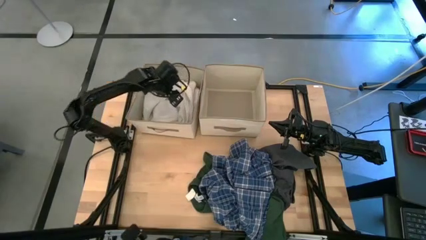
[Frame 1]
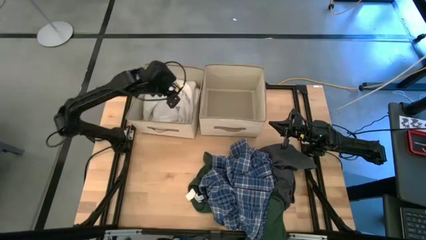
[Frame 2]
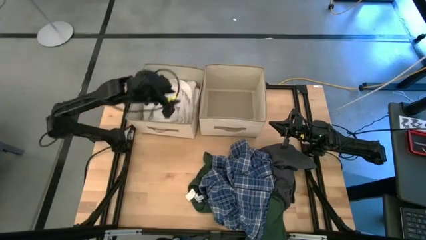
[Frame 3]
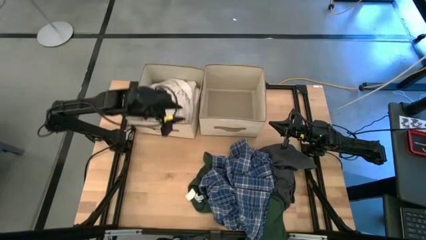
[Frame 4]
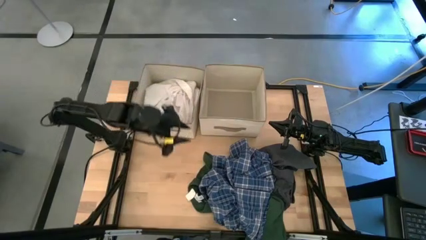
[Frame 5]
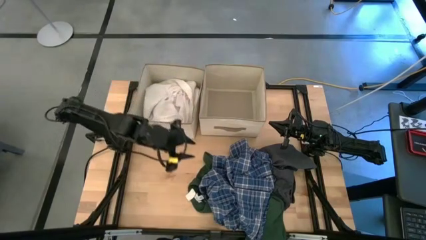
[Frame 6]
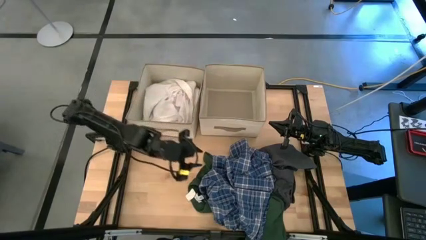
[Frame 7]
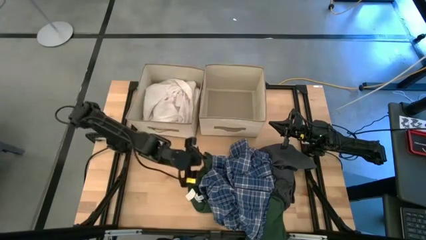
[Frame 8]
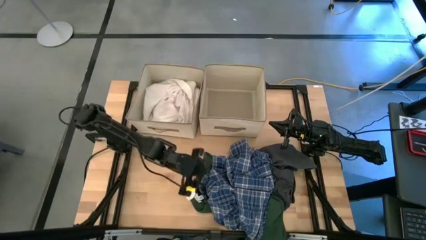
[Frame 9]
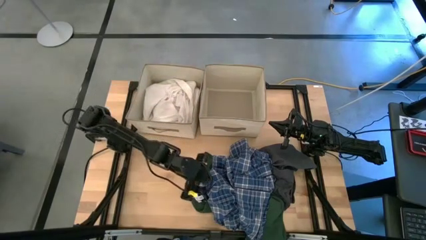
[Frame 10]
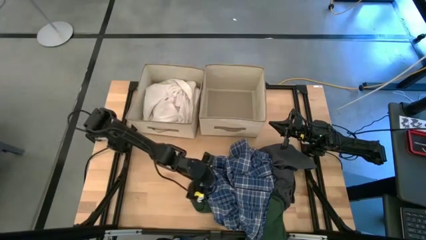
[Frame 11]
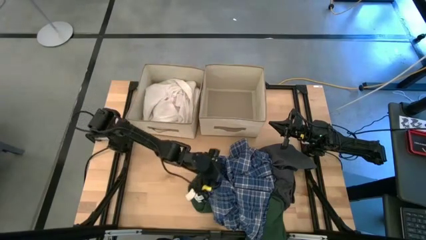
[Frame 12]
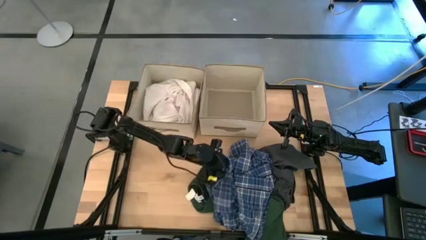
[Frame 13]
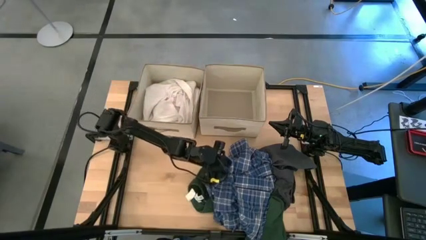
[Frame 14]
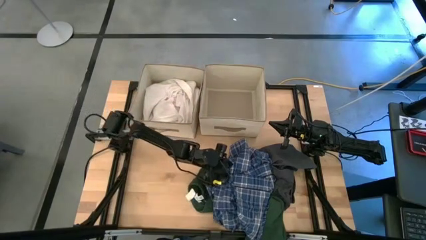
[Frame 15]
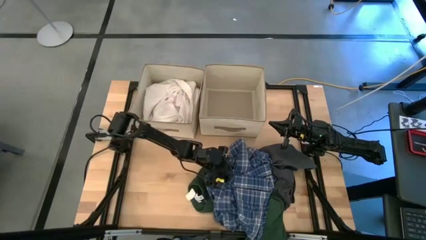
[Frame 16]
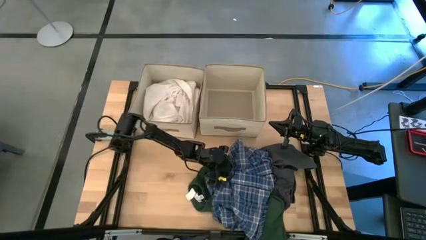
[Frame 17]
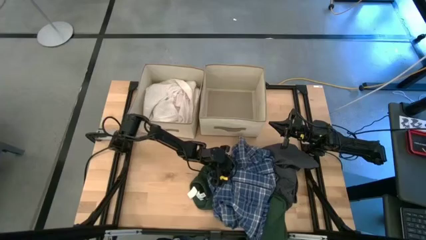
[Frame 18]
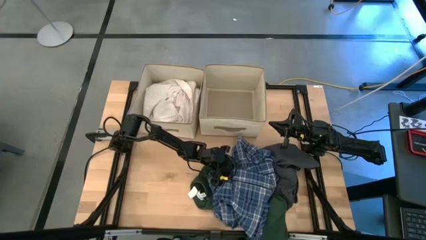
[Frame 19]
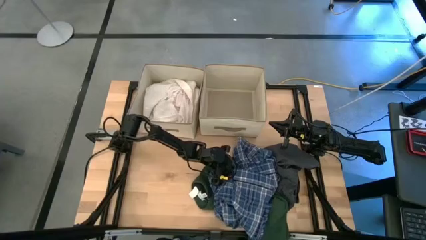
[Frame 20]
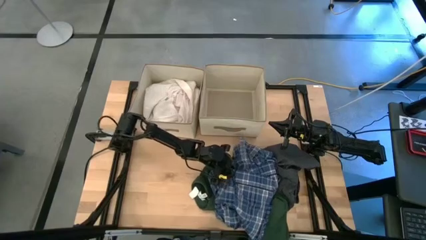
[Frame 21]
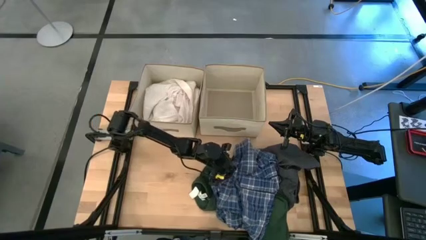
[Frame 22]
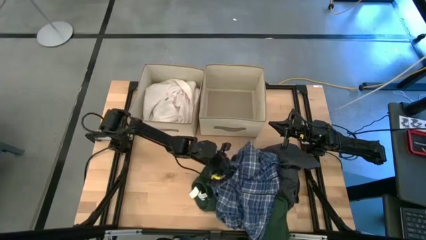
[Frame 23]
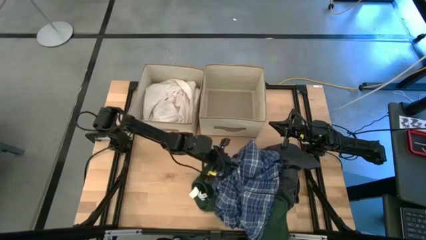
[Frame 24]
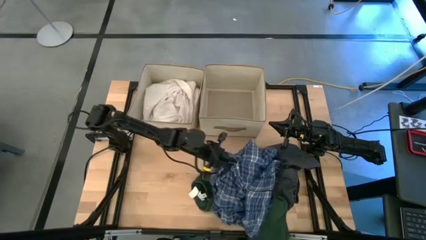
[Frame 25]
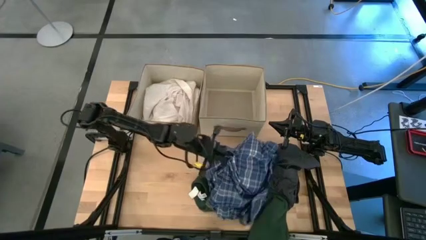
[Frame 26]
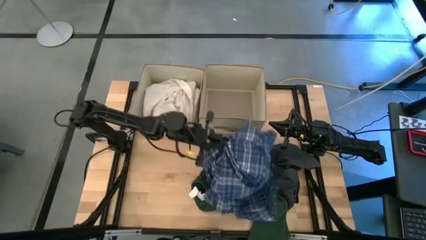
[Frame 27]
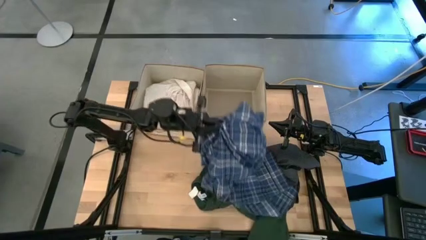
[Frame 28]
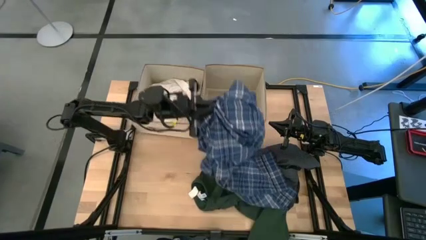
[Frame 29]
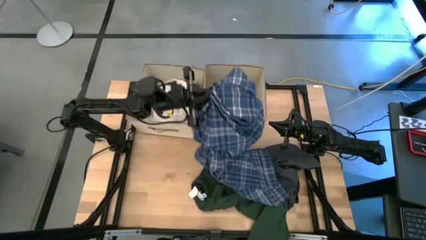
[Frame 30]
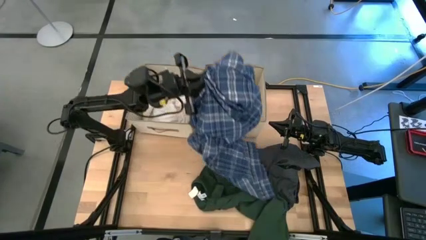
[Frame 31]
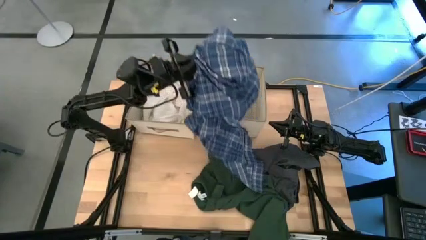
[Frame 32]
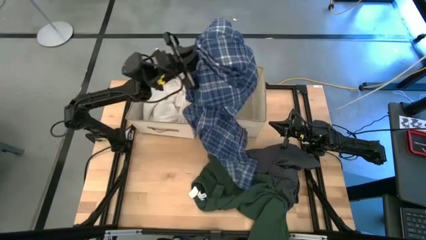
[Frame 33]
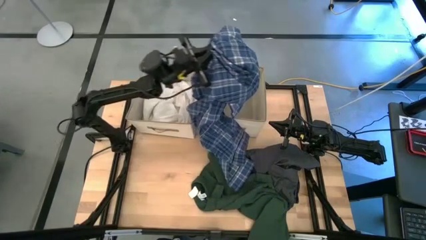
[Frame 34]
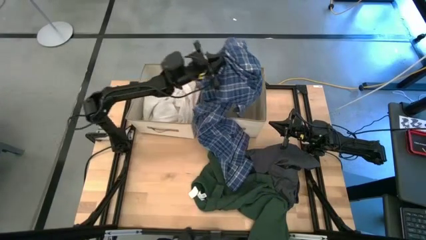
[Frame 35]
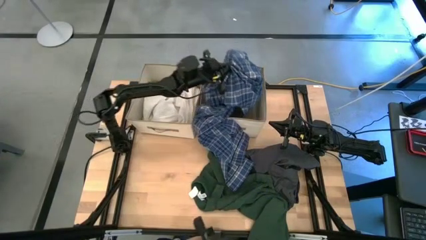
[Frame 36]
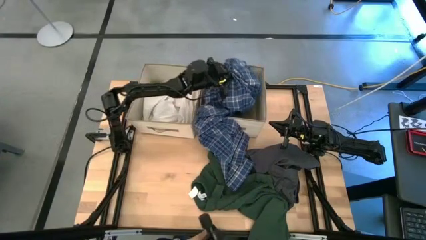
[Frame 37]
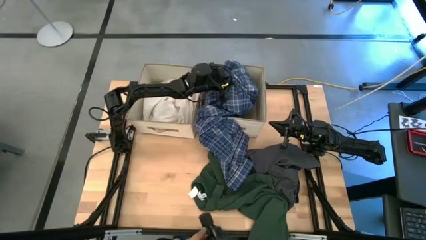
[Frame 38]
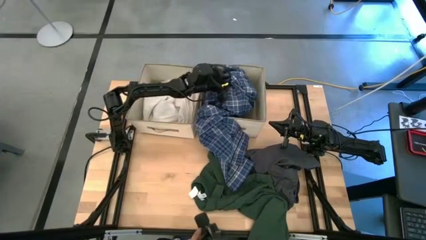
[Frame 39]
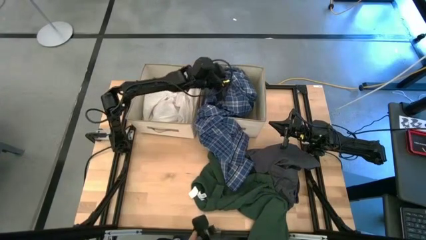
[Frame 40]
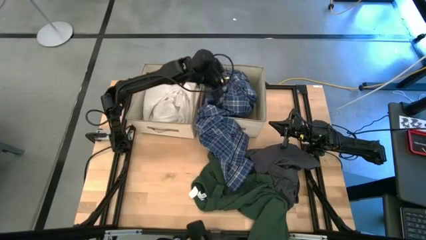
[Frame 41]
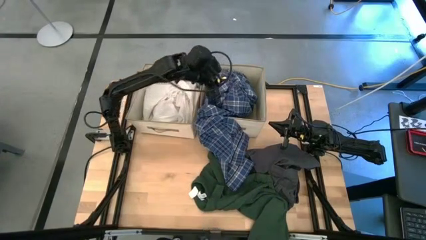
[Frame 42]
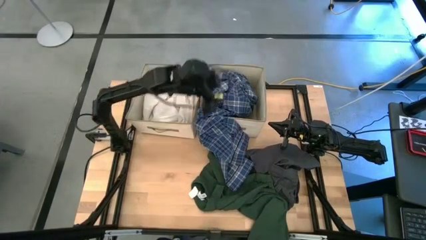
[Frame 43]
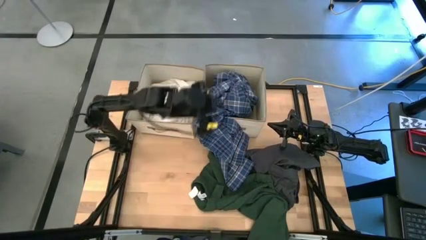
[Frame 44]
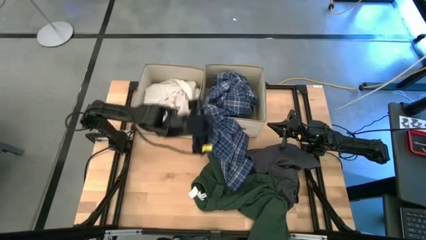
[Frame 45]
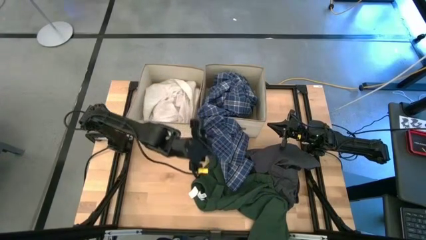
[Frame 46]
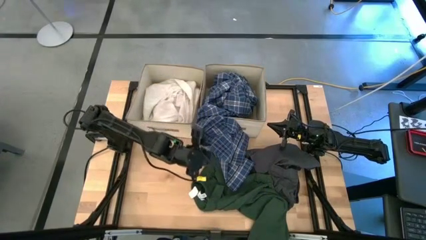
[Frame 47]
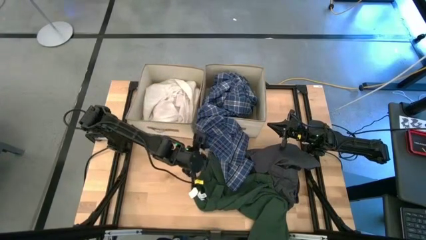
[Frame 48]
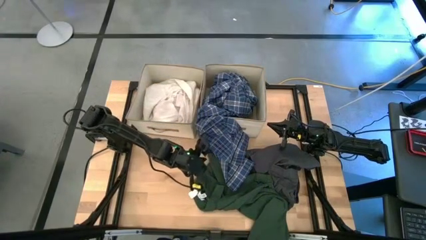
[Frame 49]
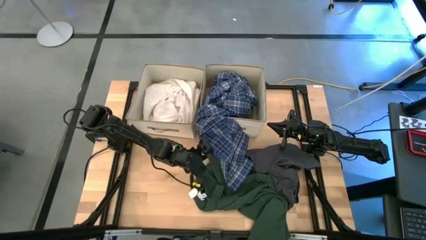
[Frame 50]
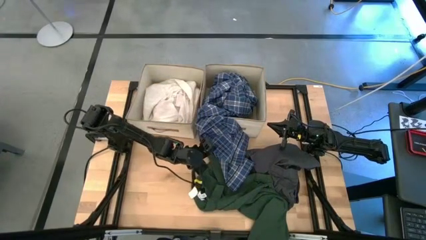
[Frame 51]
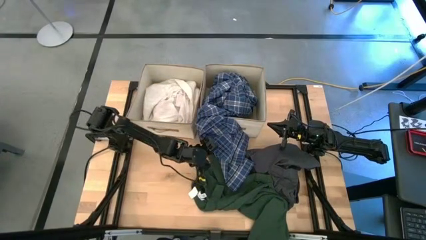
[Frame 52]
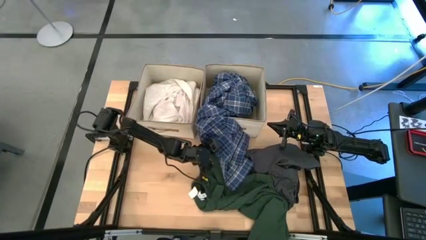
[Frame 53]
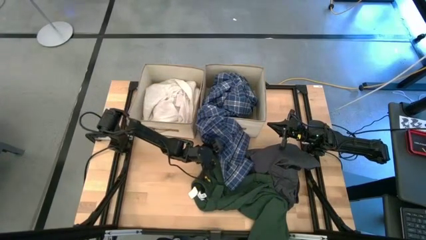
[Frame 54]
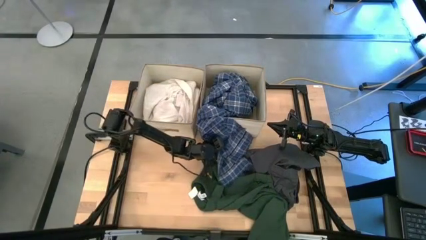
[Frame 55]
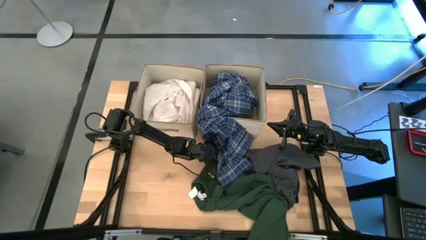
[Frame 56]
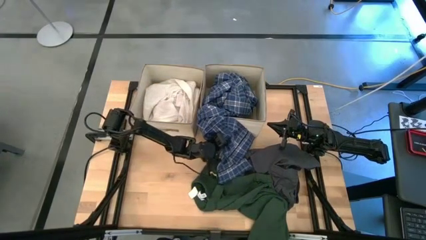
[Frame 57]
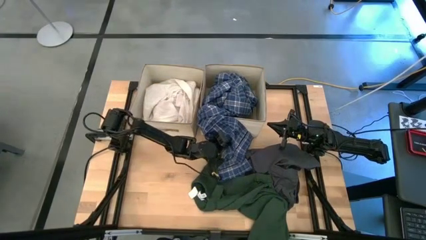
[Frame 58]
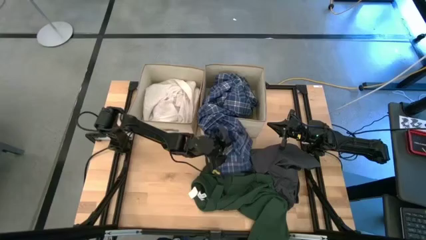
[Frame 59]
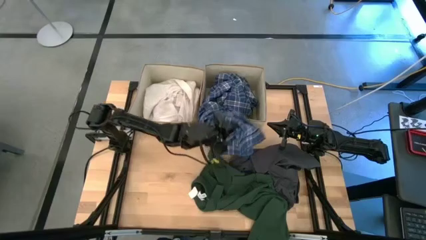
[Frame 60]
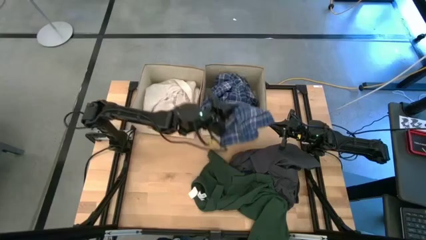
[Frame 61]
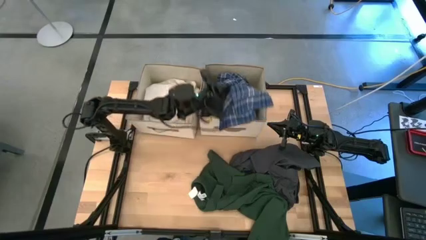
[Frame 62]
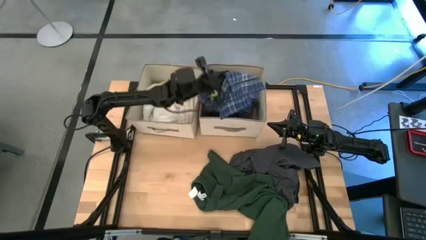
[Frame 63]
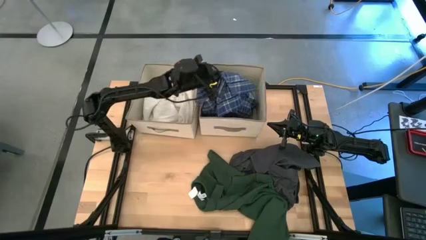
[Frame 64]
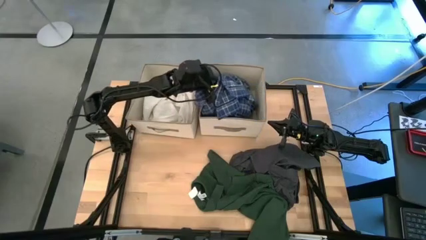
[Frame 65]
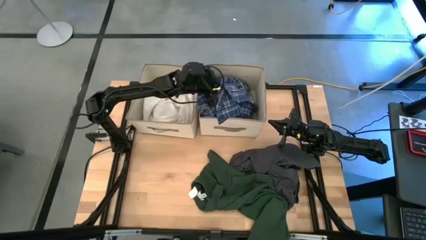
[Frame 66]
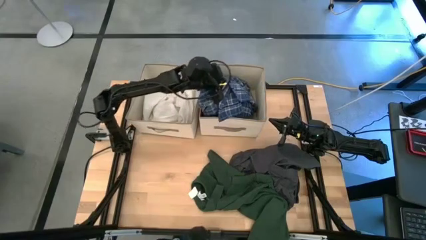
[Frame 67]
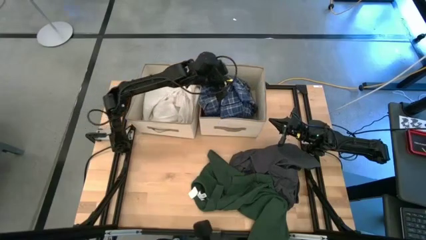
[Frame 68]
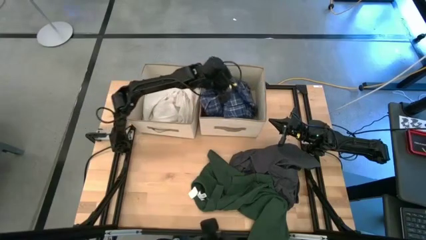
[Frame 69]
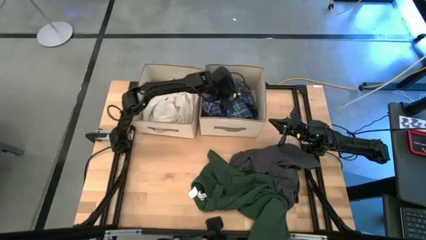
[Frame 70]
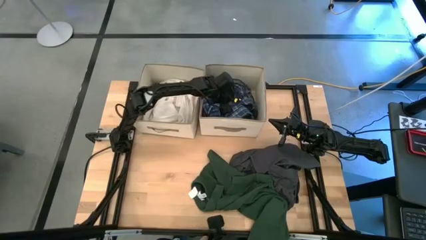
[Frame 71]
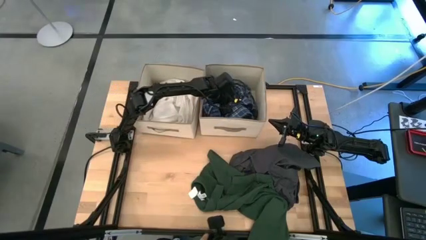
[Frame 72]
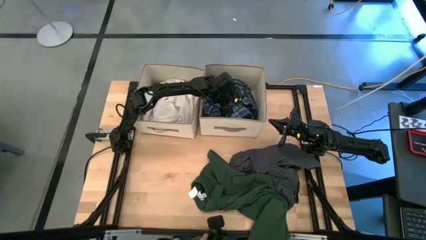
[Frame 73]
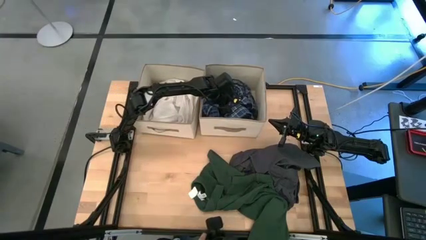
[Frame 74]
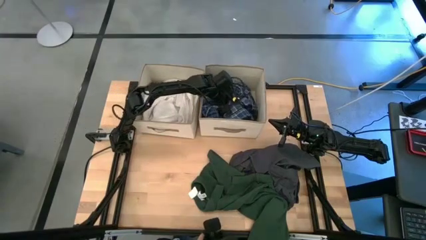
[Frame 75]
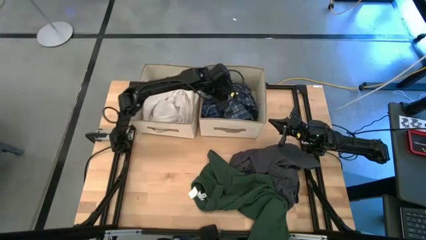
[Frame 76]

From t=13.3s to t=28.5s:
Task: Sort clothes
Put the blue patterned polo shirt into the right laundry organizer
